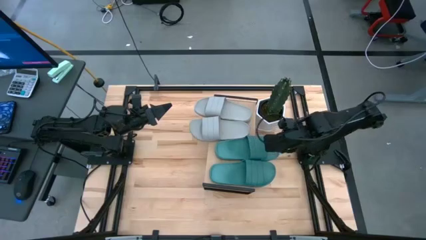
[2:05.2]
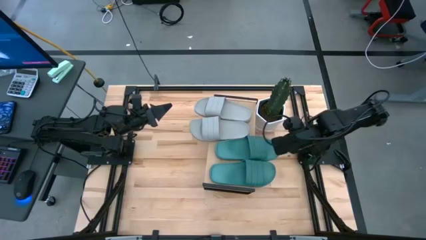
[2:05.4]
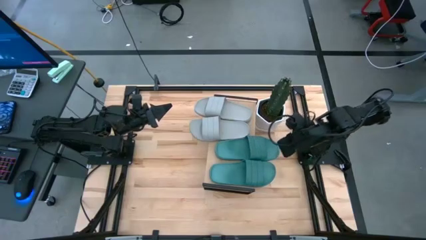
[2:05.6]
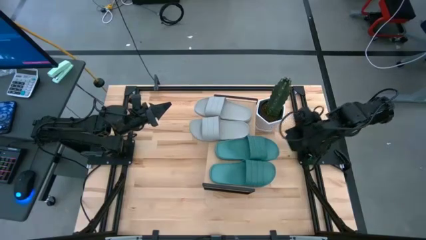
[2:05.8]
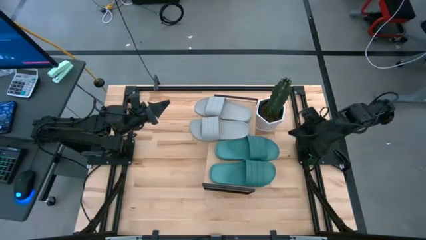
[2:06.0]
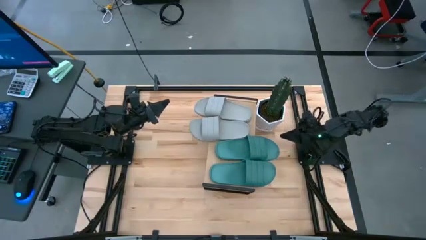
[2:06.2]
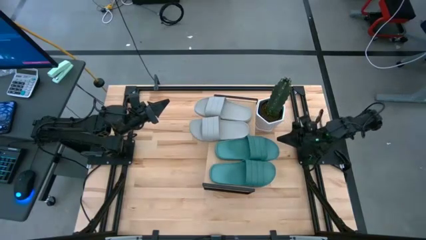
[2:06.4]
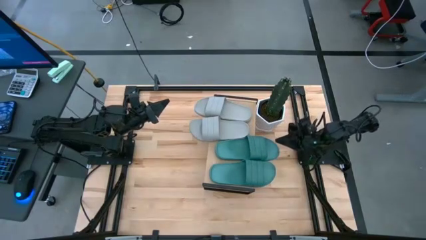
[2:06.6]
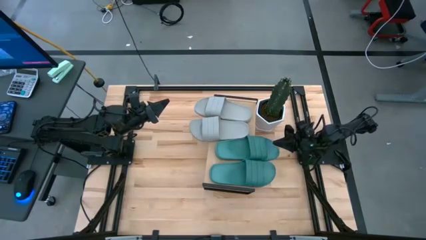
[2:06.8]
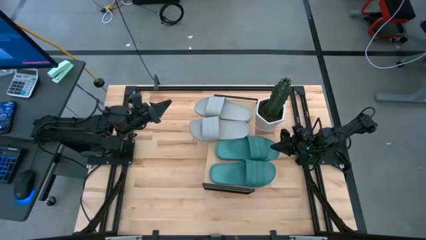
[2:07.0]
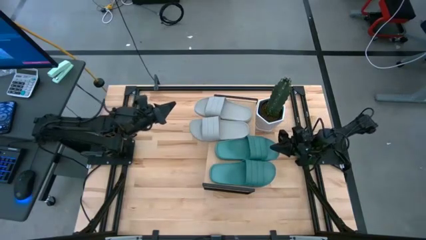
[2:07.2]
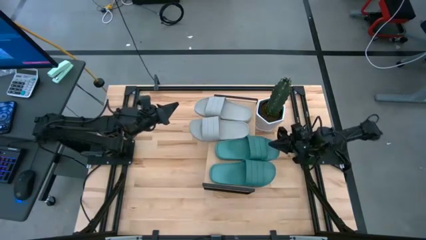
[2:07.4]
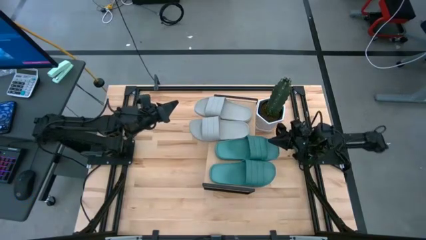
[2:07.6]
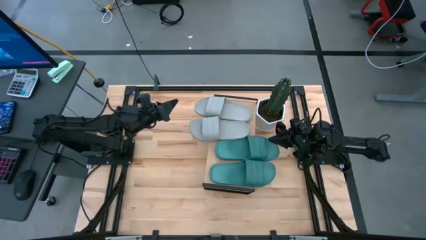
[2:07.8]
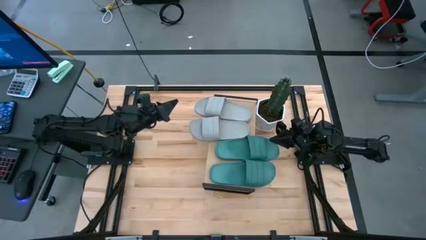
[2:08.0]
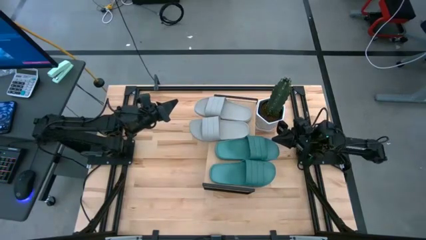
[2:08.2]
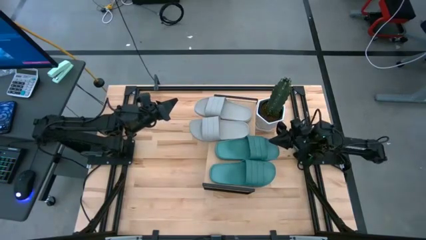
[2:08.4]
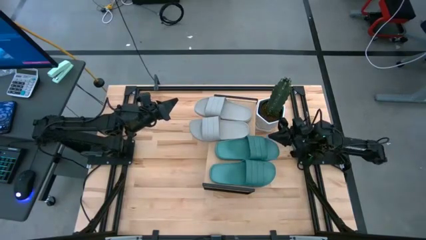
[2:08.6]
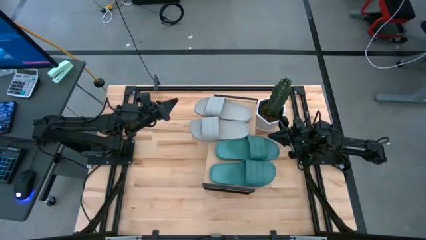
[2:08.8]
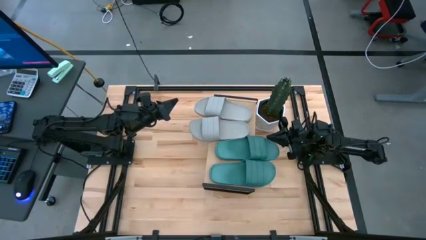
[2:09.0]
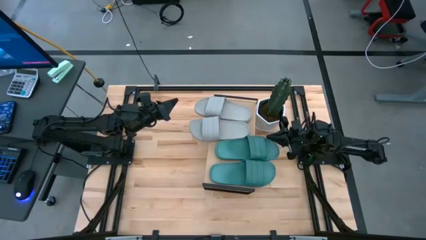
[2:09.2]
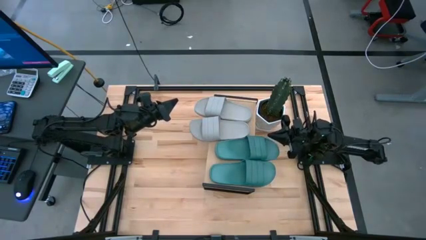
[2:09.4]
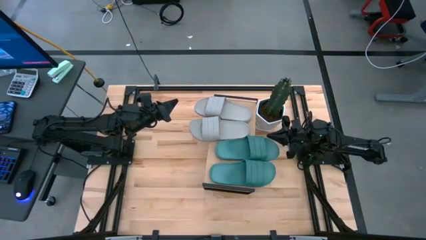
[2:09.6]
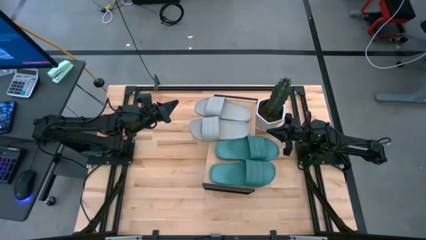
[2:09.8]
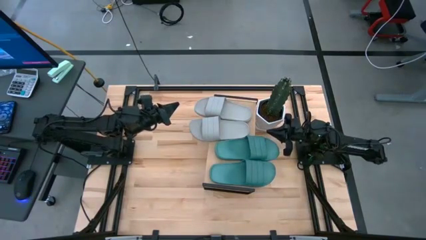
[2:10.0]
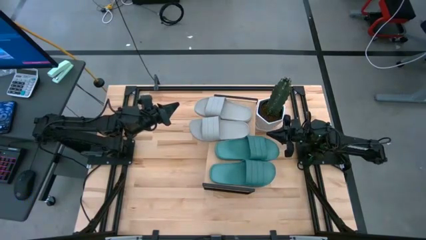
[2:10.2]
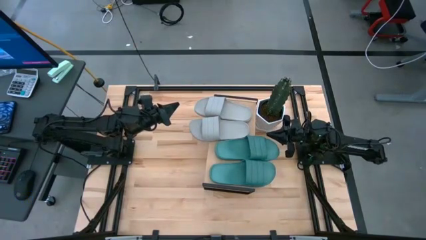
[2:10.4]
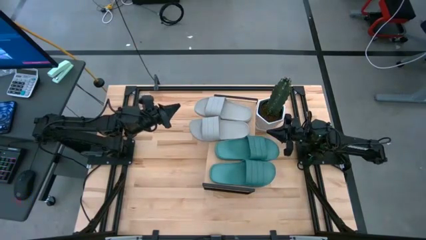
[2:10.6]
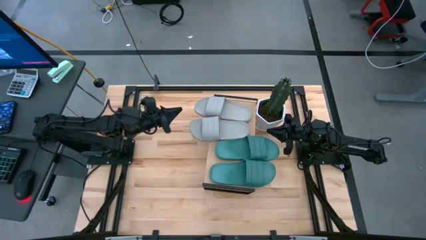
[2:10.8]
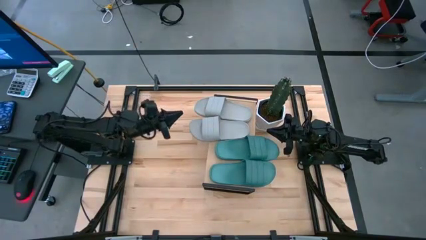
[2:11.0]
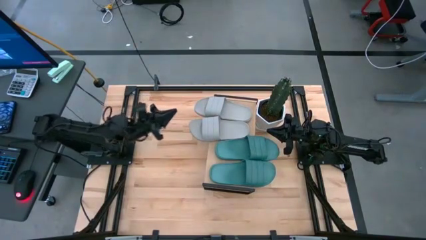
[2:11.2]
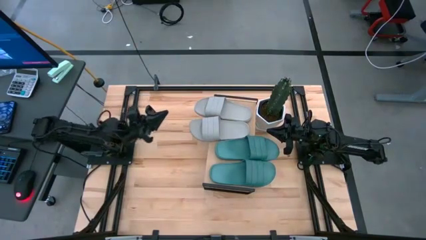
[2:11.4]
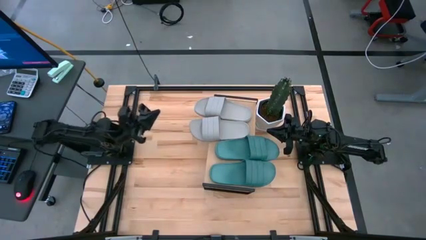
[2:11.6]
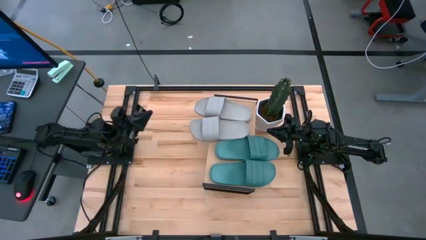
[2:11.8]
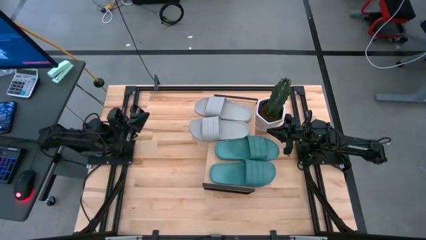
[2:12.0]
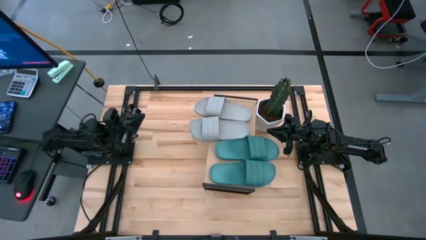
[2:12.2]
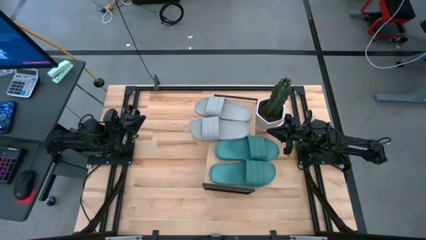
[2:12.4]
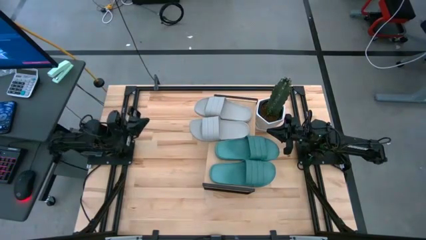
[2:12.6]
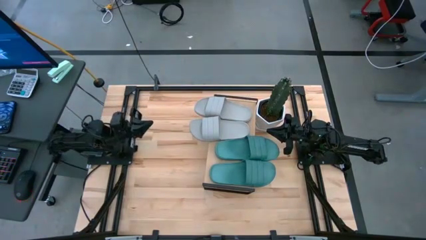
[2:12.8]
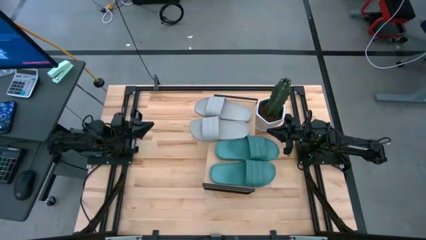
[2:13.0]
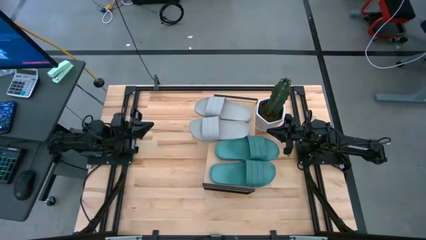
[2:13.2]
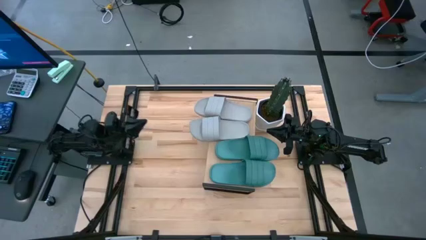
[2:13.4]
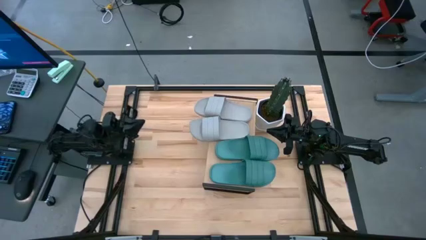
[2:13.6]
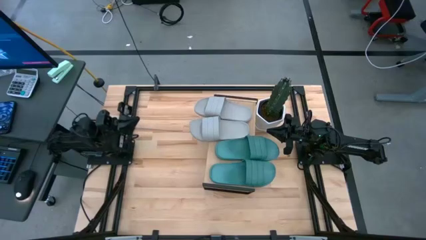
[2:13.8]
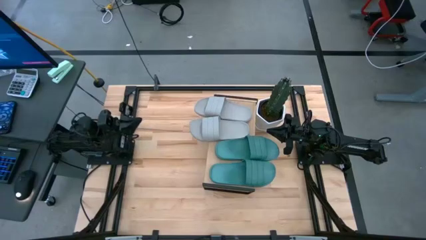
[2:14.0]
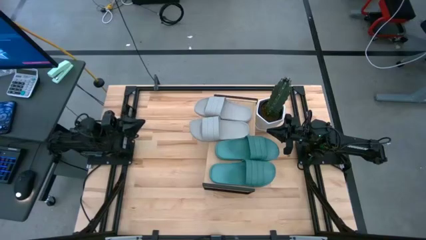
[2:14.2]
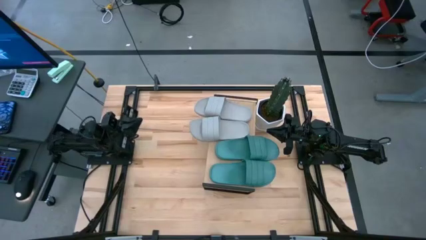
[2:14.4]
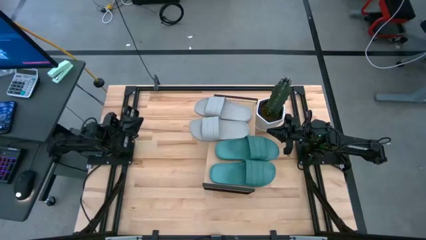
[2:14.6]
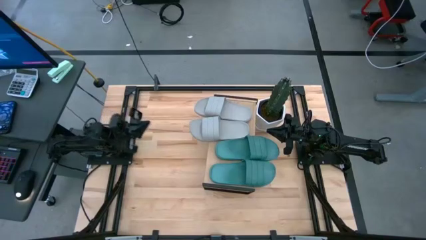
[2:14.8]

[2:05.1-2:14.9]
Task: Pick and place slides into the shelf
Return to Home Position

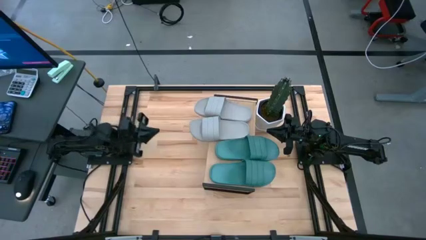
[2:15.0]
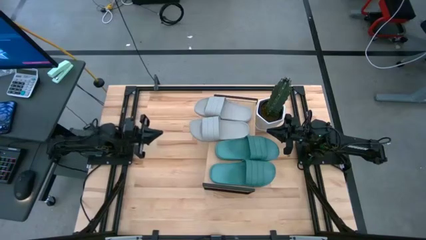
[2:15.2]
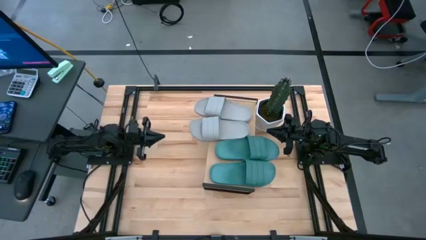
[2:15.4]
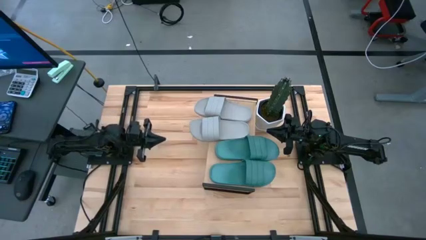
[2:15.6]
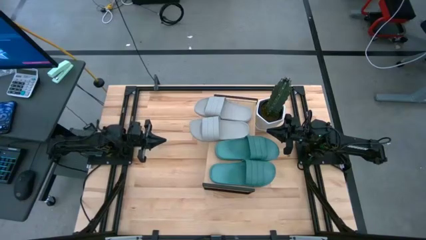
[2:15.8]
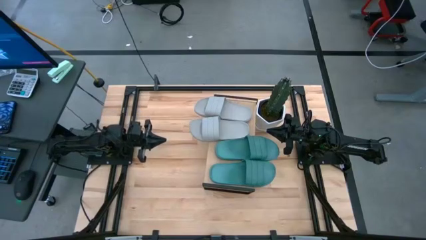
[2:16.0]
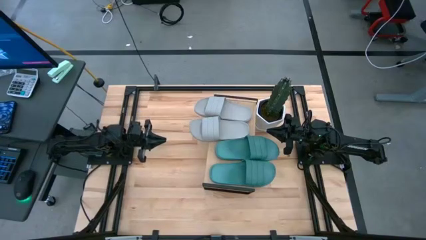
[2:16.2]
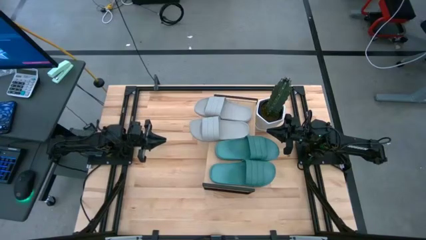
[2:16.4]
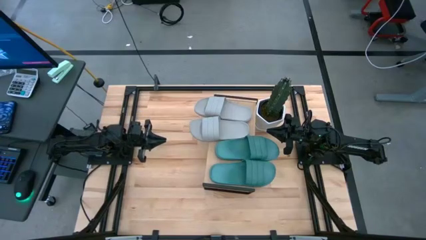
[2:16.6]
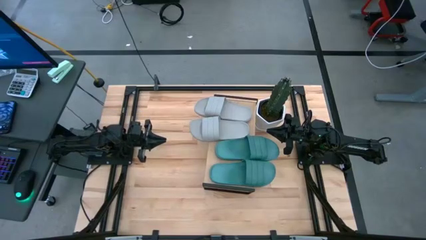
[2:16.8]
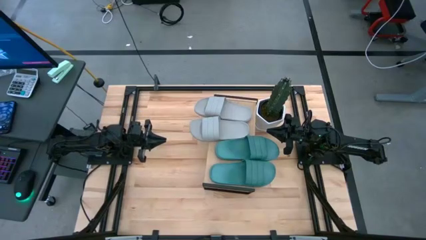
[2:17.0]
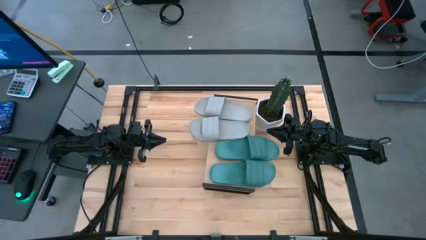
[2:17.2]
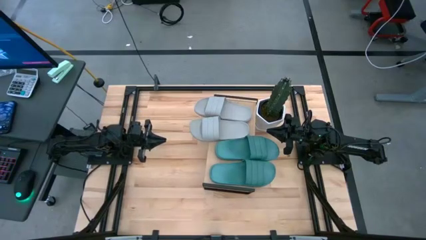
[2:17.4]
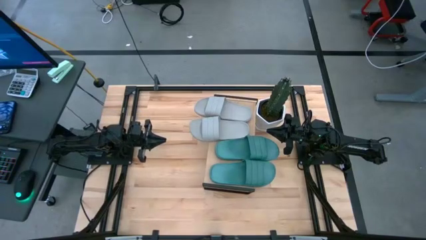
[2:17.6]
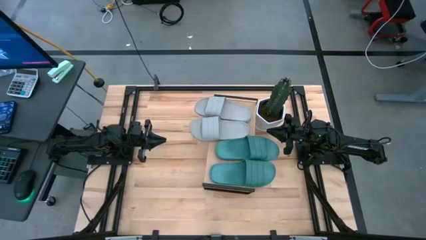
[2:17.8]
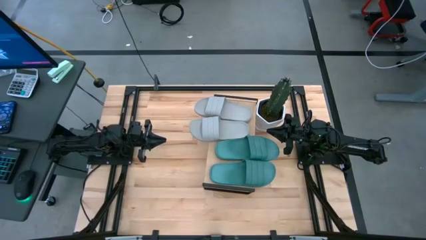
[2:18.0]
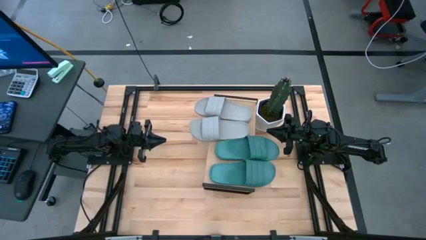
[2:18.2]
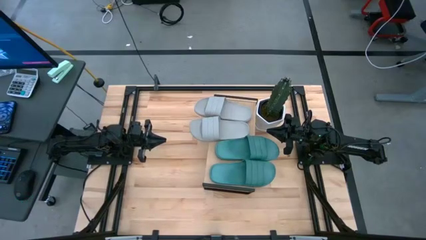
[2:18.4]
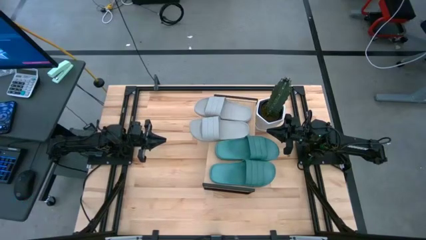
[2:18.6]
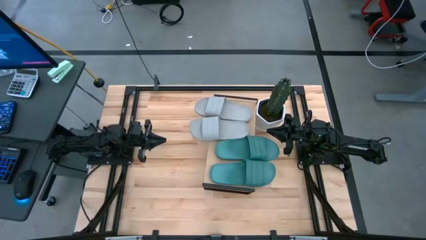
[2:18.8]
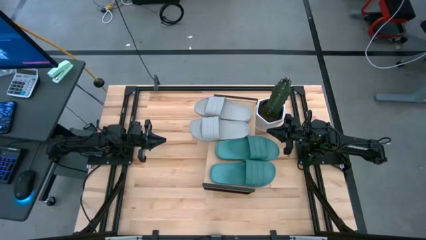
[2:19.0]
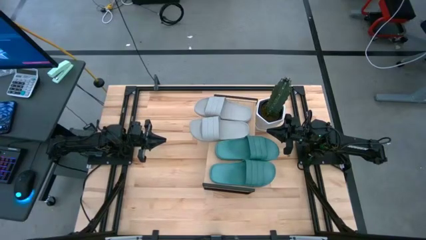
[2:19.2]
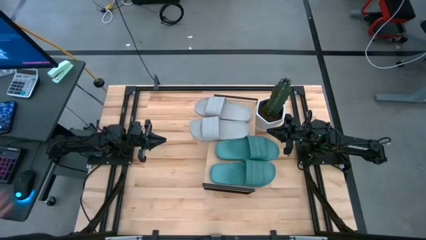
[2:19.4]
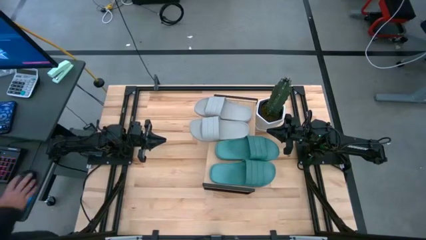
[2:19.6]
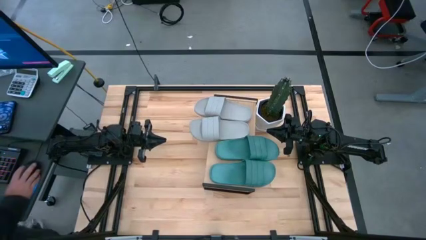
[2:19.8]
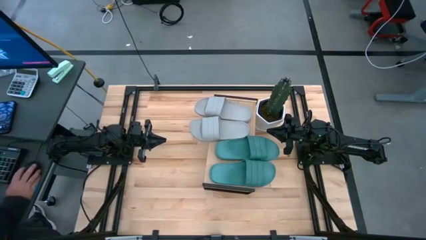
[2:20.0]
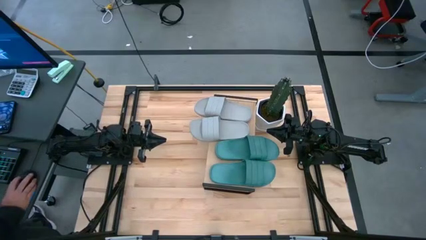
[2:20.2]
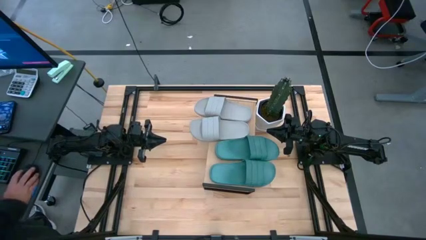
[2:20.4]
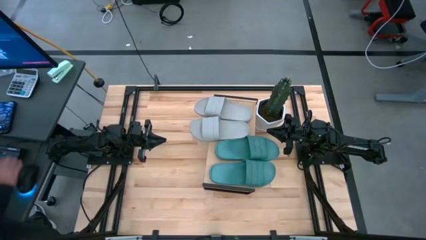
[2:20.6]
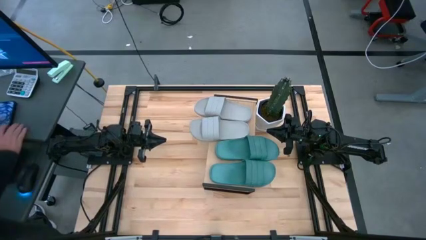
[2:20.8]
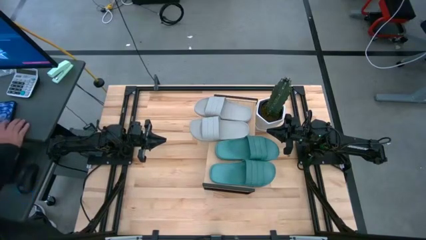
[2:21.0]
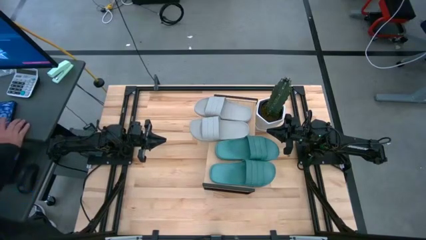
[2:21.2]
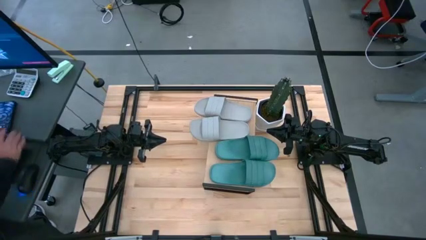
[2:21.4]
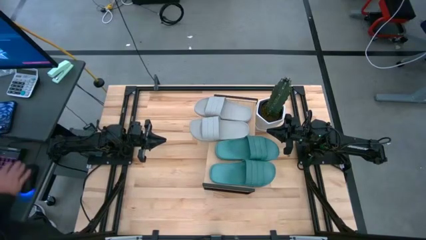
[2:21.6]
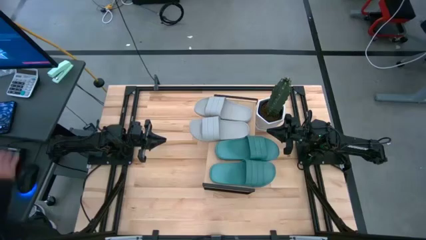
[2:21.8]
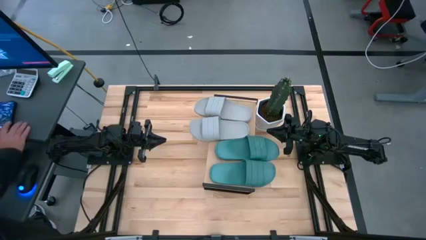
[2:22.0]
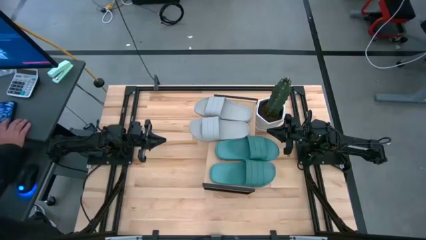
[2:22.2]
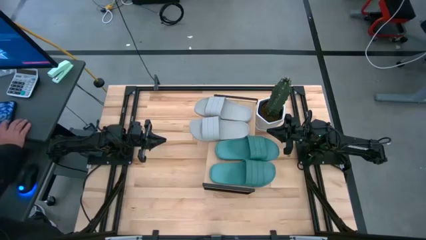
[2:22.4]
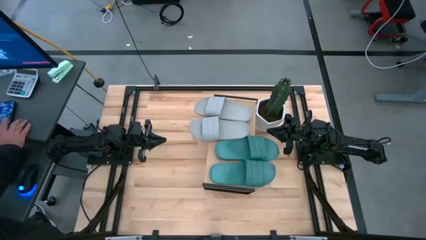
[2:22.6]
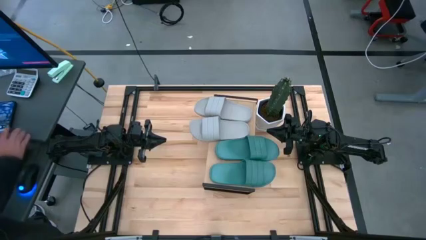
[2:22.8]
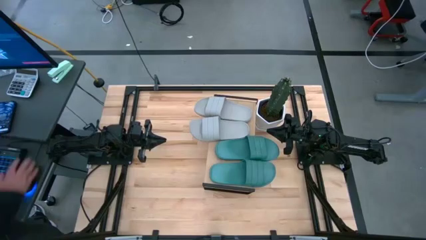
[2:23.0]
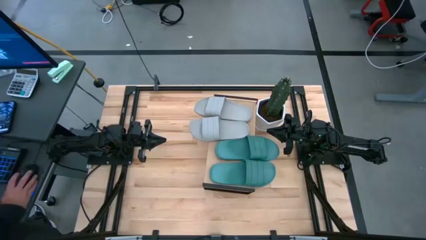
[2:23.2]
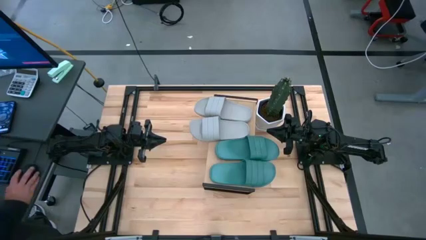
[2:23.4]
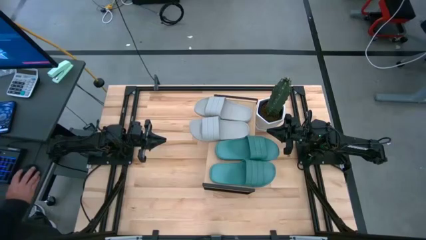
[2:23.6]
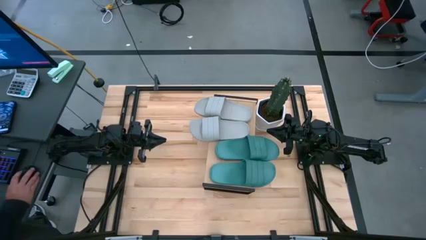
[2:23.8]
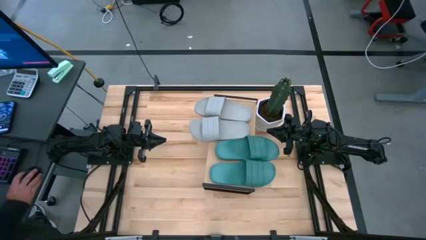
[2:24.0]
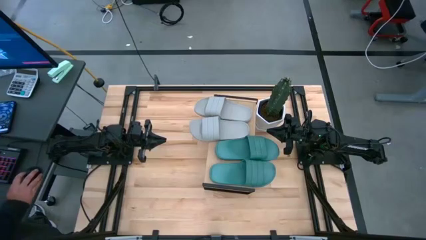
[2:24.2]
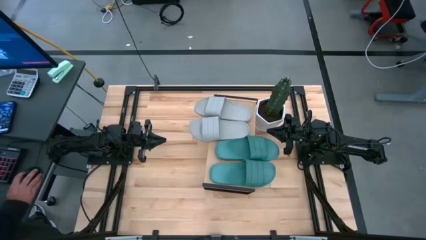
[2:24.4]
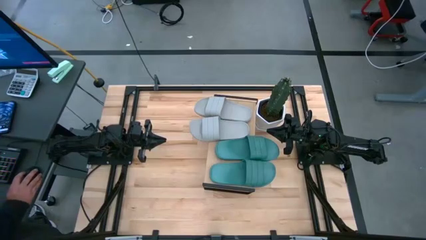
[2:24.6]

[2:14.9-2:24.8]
Return to Home Position
